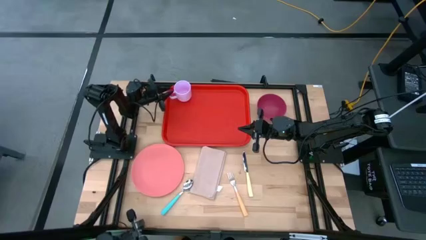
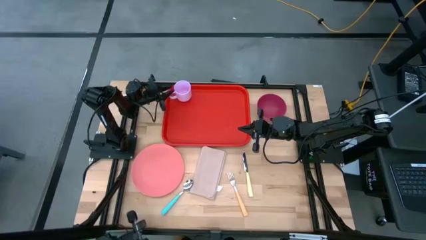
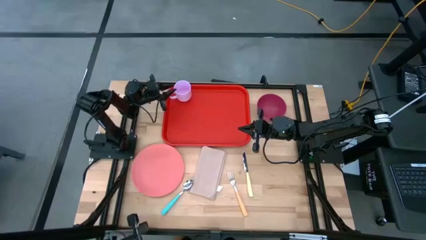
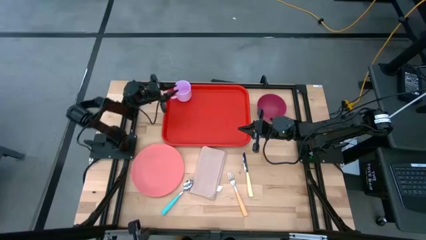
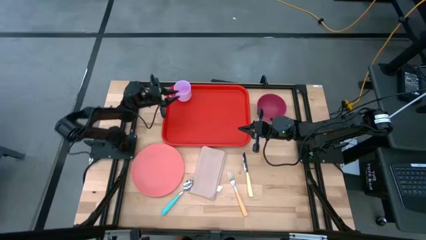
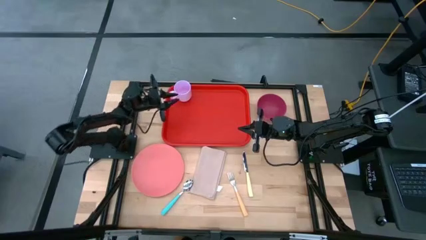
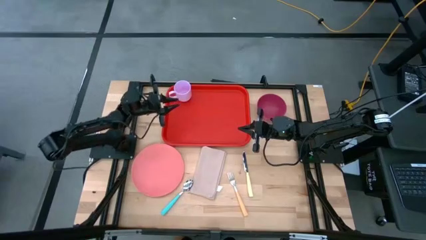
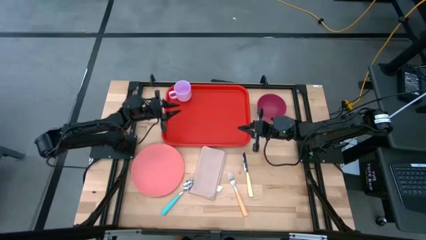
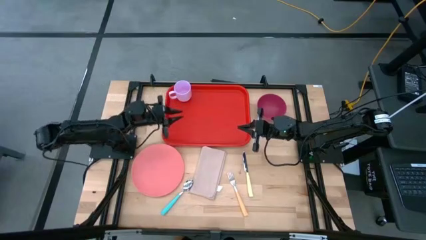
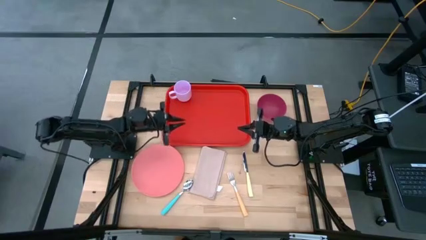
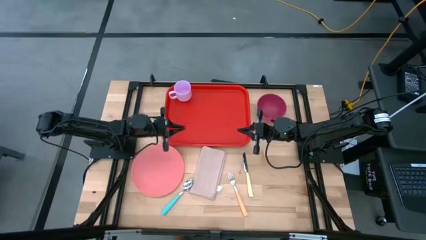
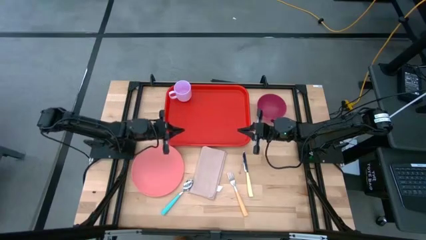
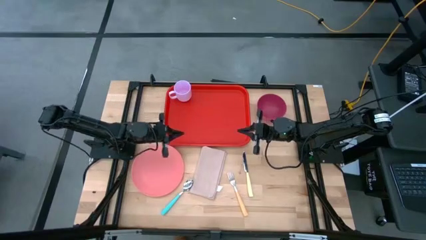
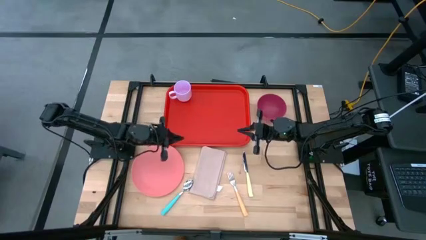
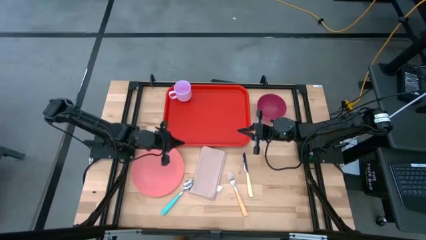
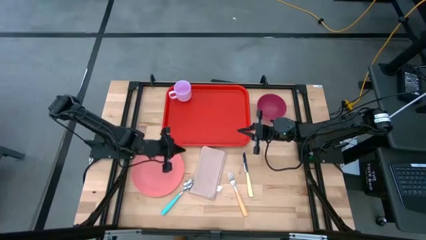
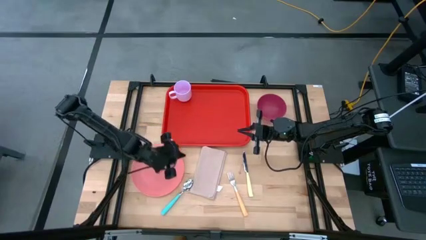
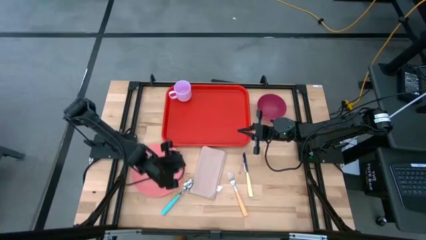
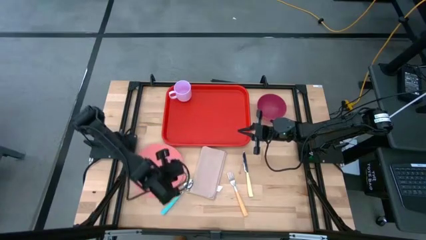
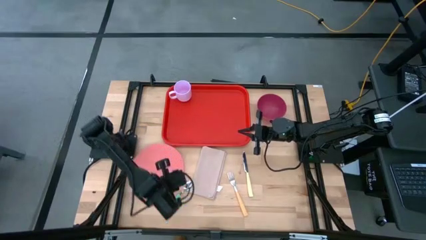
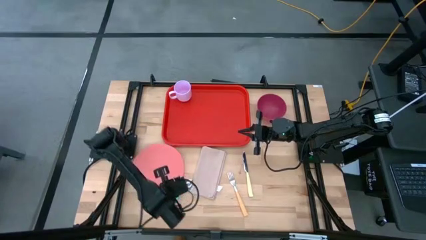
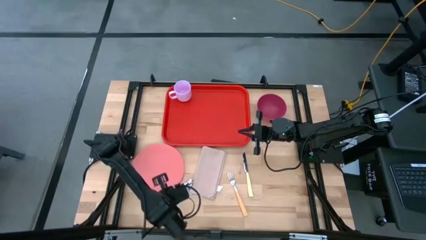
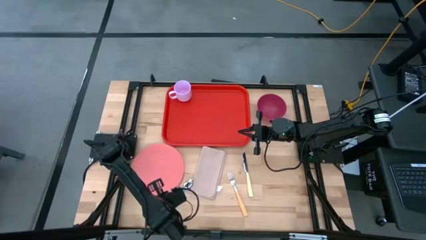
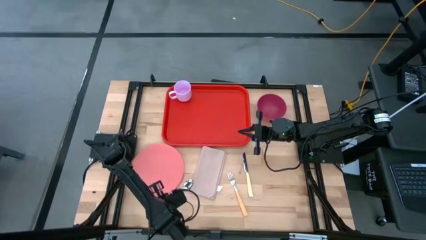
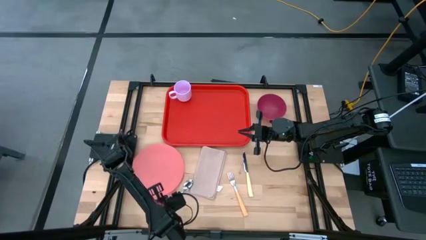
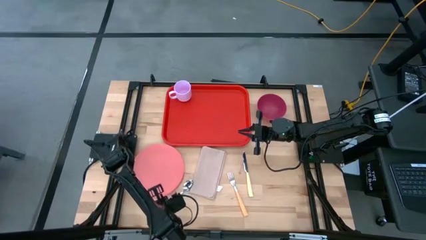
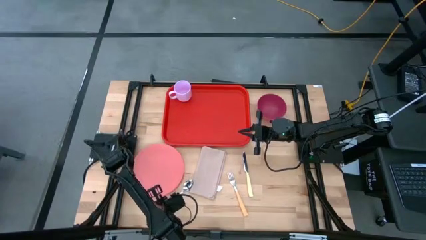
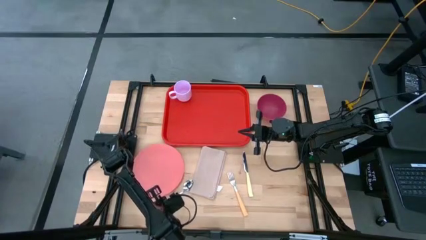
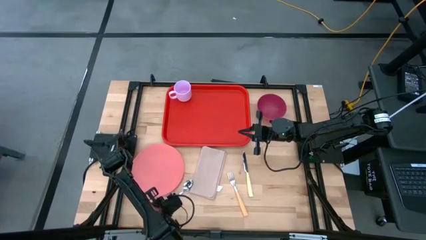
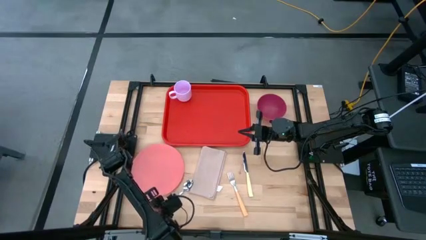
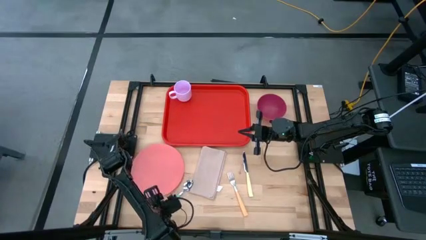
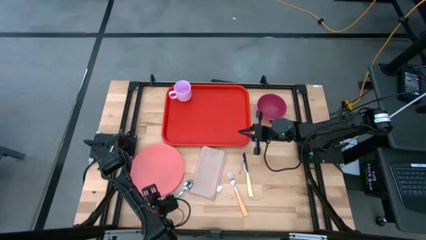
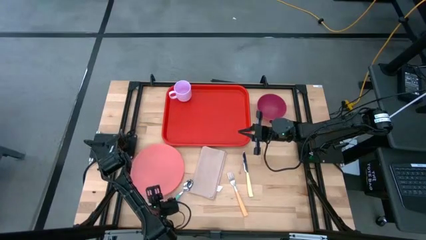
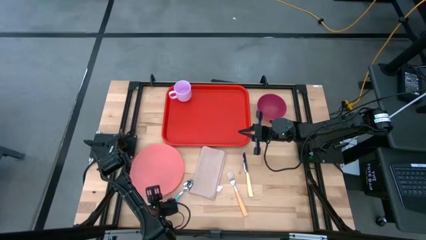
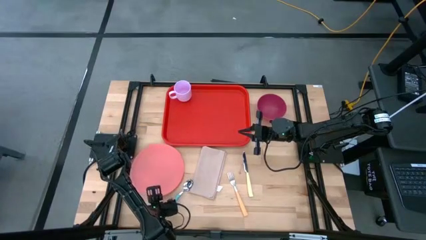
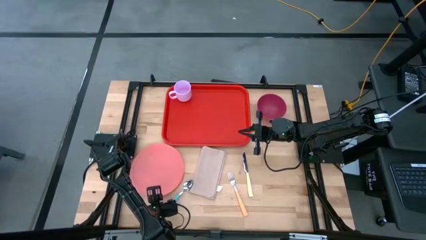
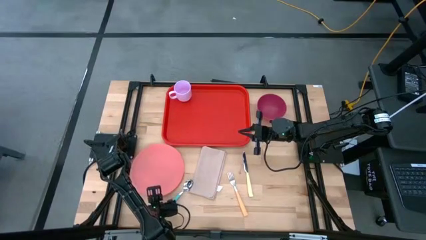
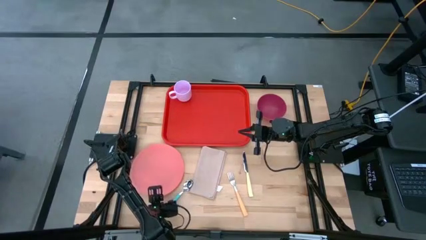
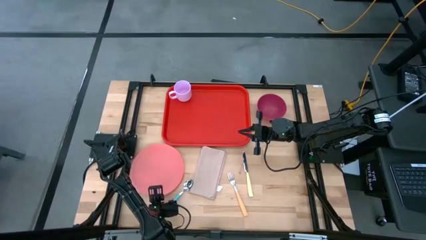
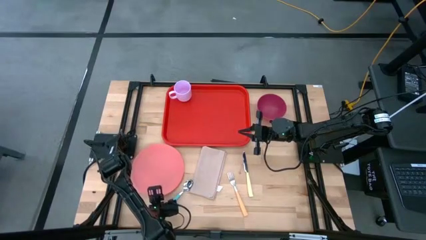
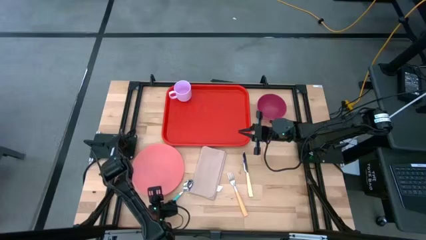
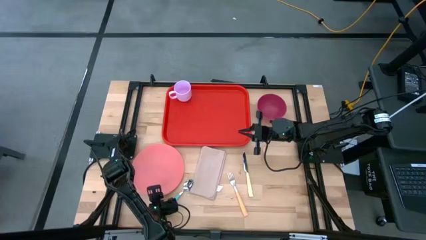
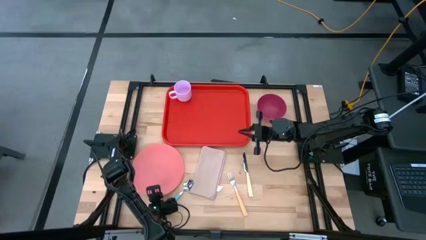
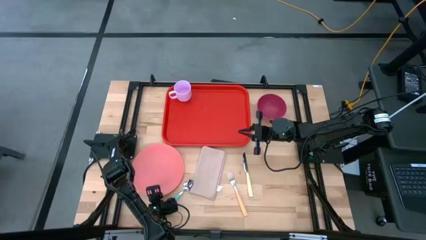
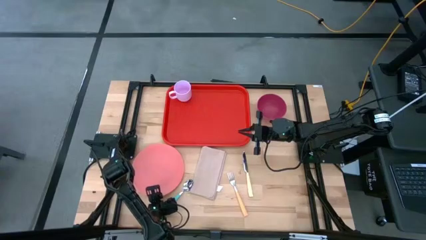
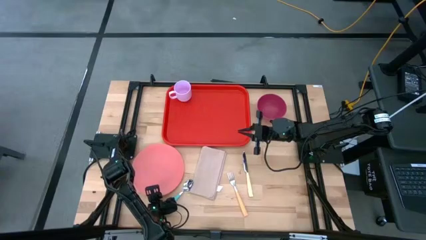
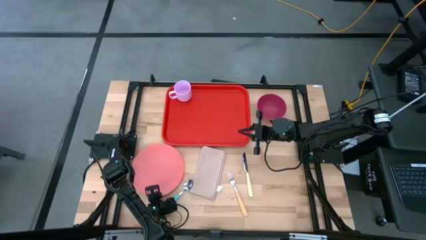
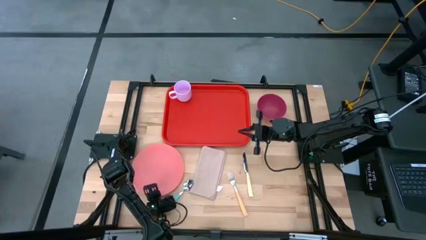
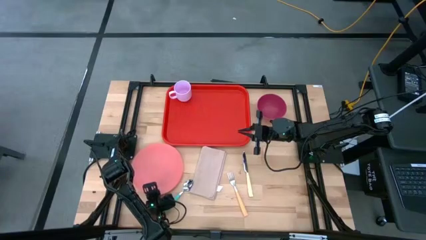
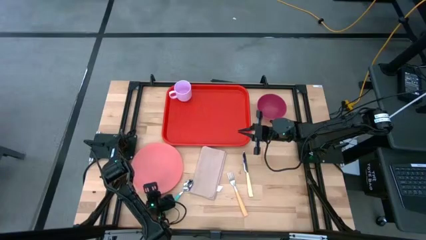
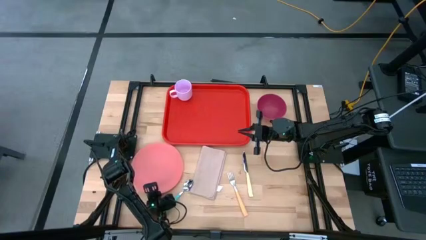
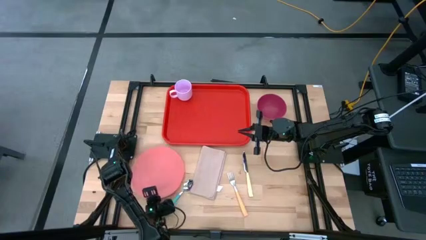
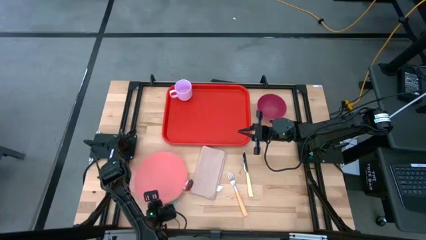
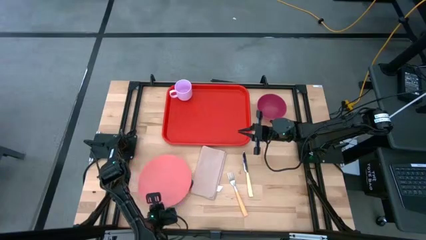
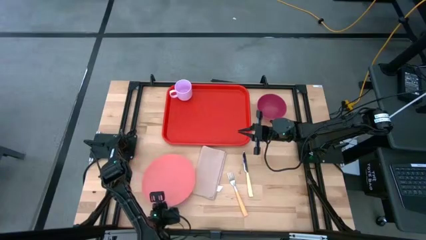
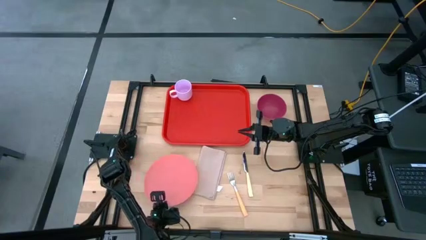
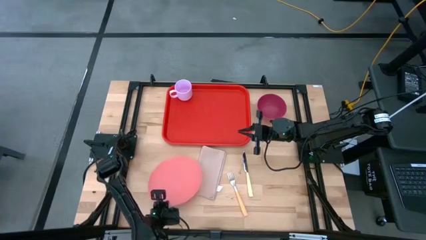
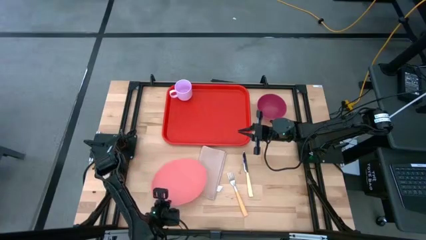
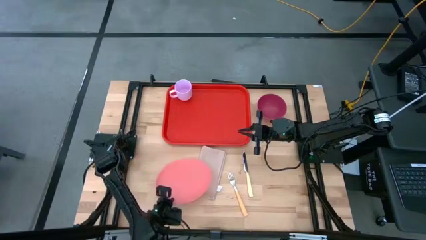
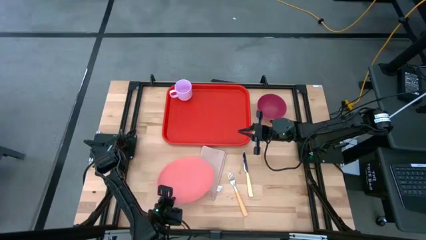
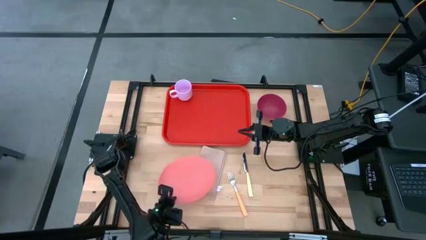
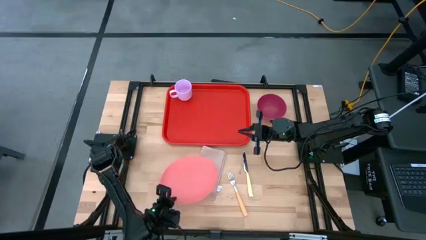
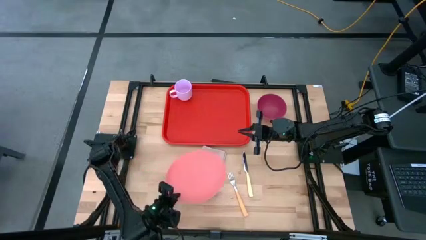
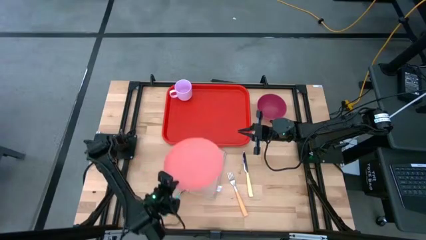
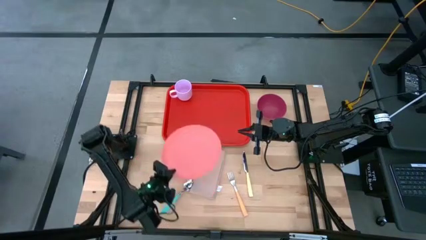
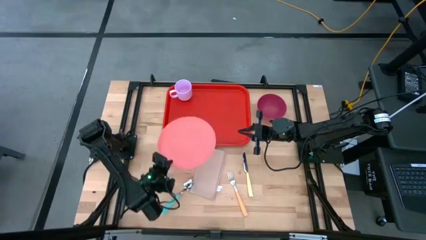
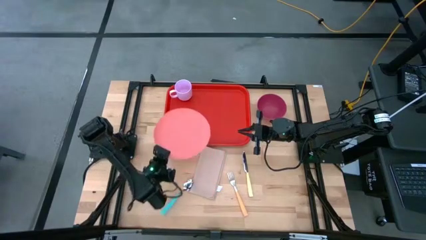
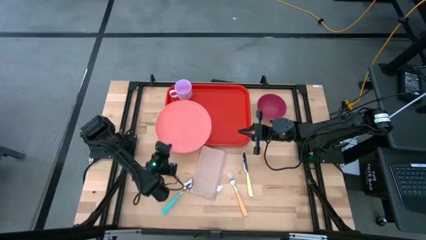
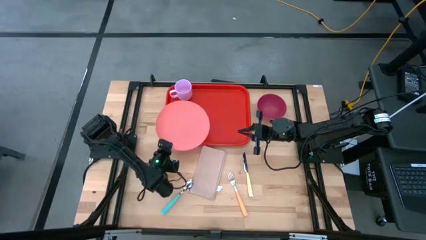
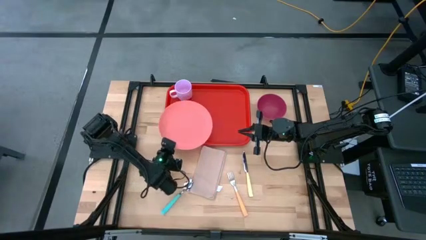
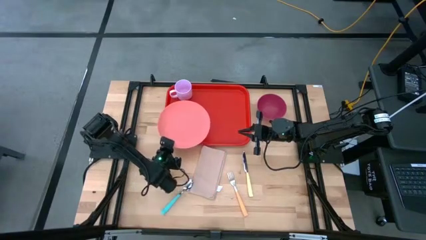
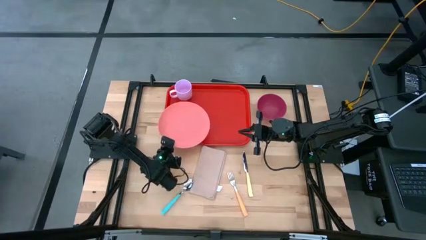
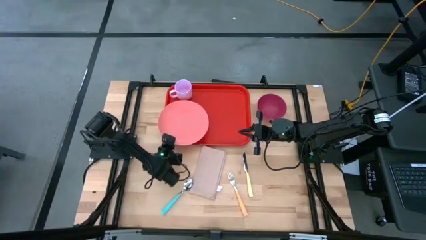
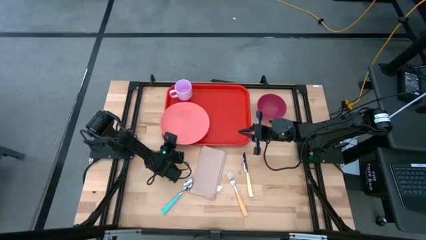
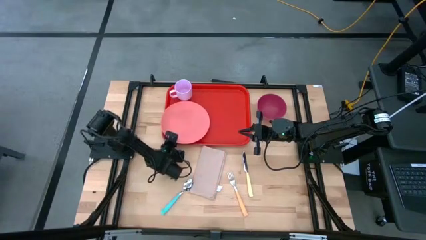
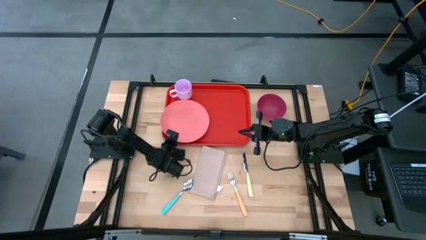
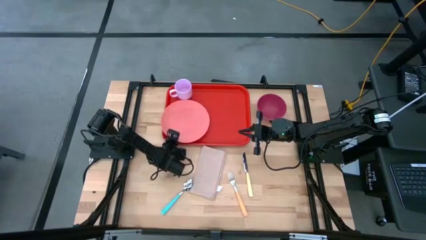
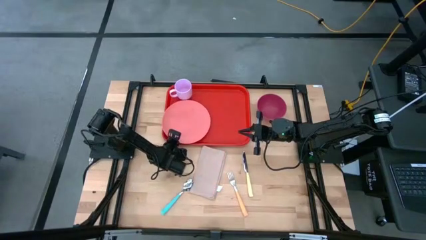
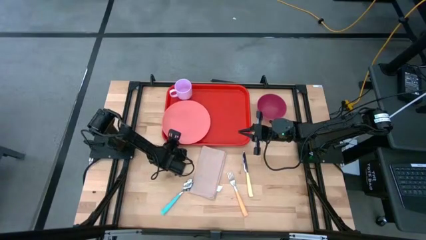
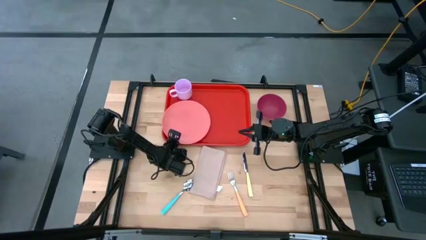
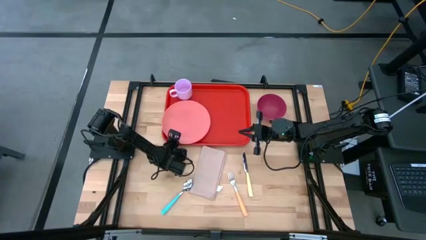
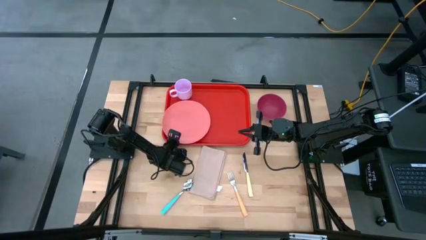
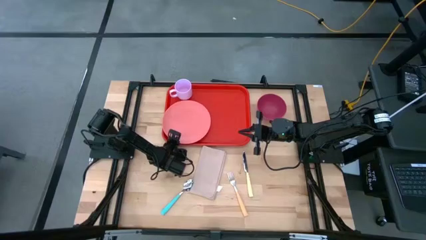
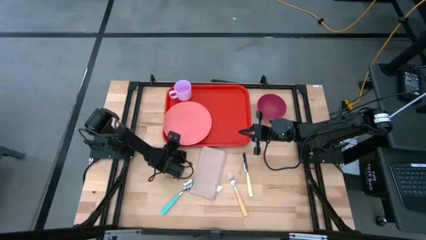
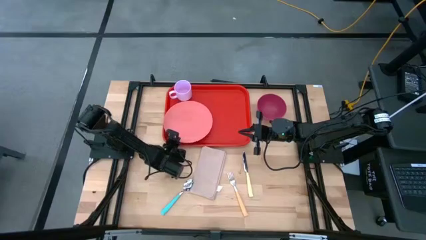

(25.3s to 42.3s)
Task: Set up tray
Put the light orange plate on top of the orange serving tray
